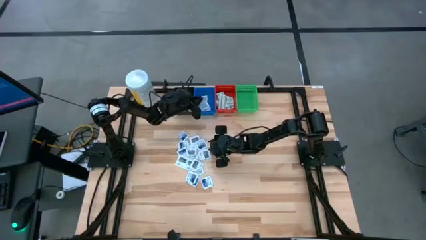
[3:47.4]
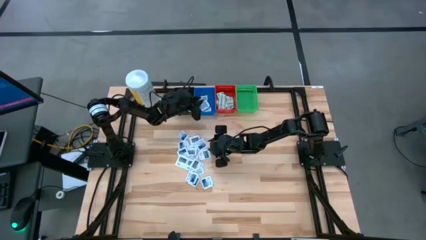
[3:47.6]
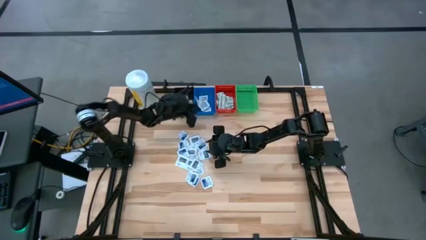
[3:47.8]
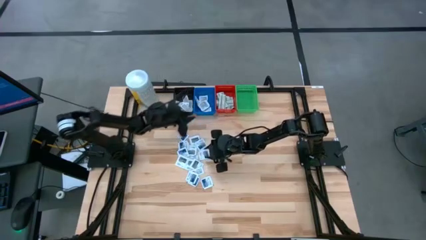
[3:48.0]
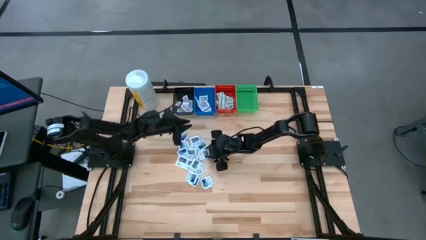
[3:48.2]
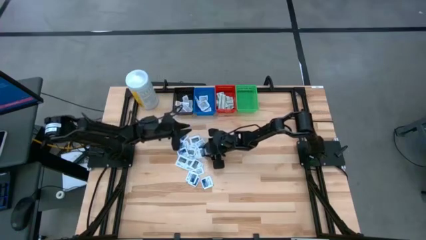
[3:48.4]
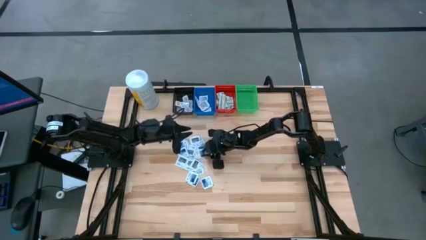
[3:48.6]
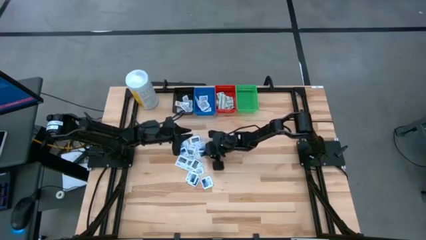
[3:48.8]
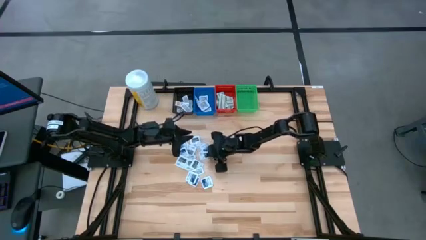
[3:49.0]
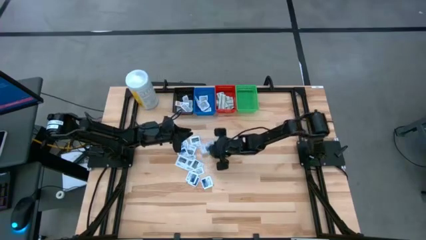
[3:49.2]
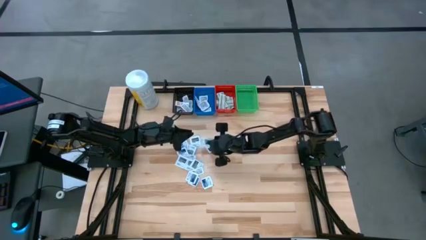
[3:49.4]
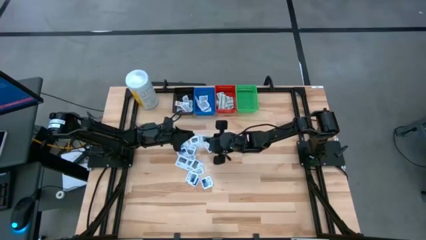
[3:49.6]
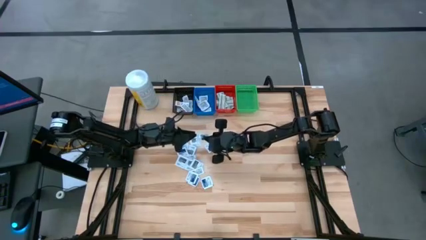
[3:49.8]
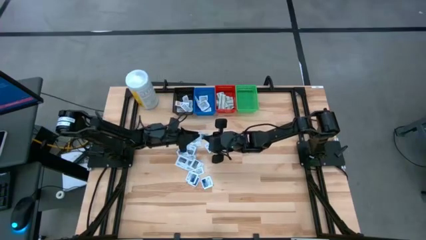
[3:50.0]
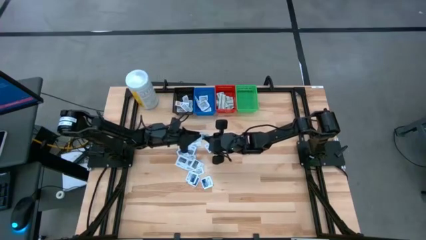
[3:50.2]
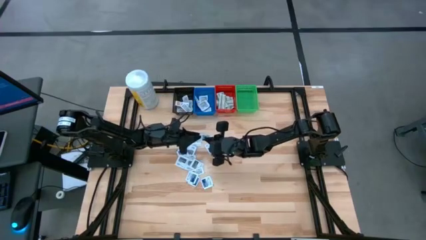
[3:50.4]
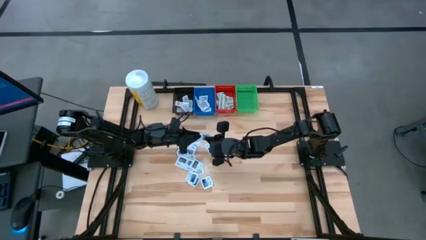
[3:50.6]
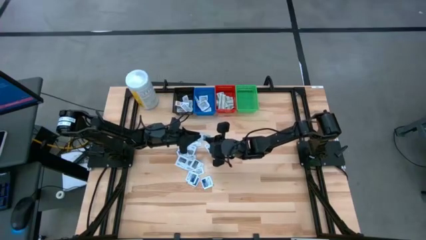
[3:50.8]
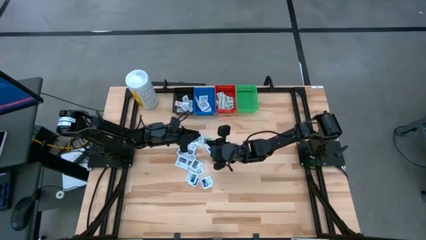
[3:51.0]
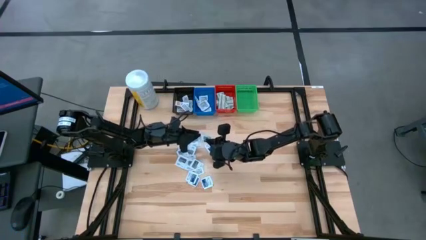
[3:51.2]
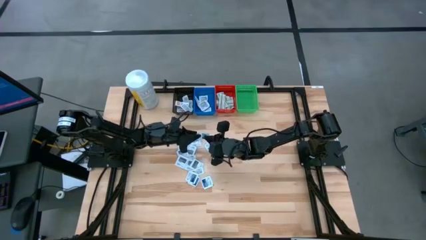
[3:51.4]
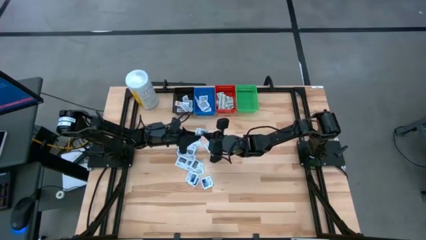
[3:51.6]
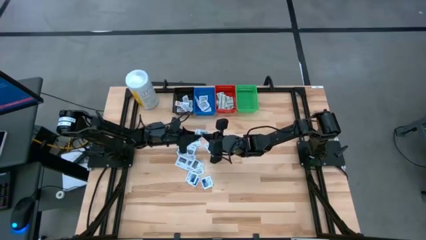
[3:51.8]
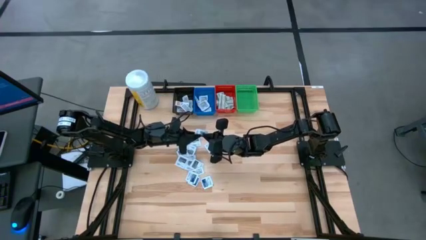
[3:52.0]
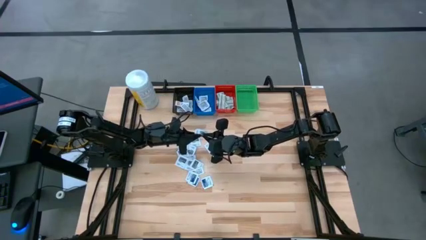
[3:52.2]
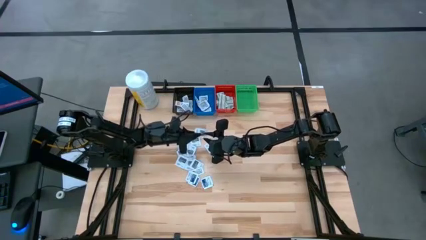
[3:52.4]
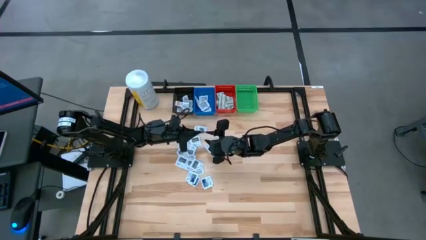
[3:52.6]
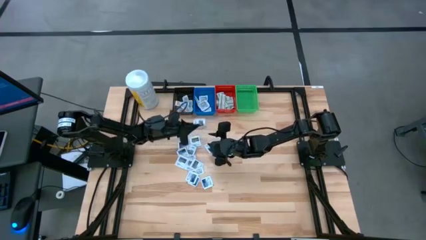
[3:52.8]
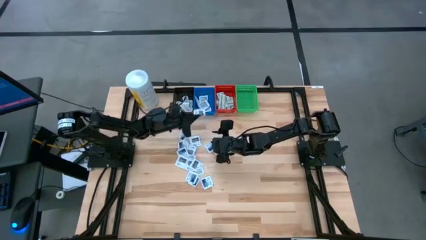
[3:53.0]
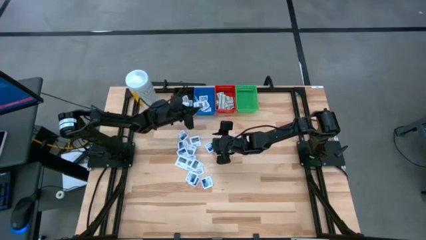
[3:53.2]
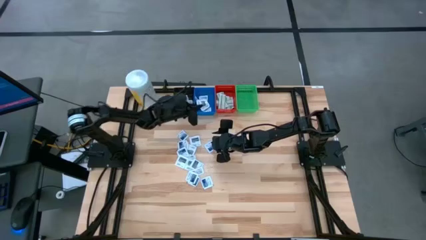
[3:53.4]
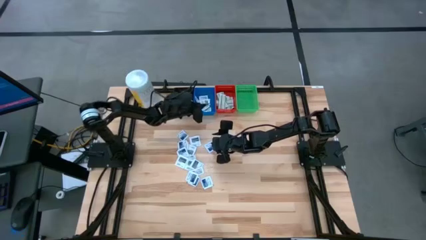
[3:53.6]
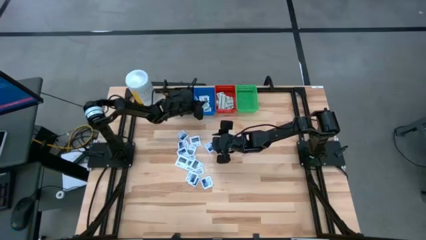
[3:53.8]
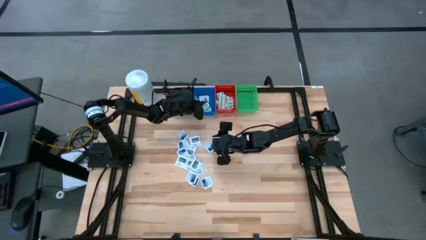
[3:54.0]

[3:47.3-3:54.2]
Task: Pick & Place First Aid Supplies
Put the gray towelette pack into the blue bin

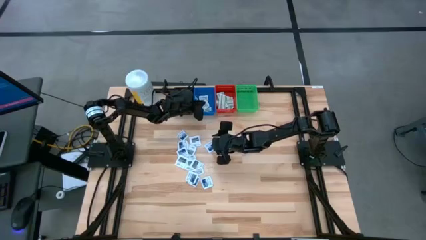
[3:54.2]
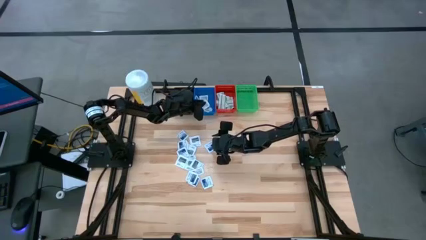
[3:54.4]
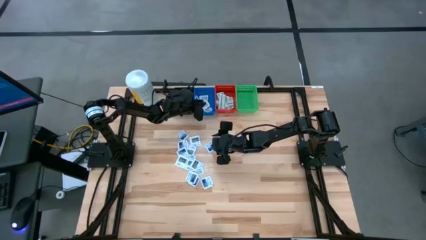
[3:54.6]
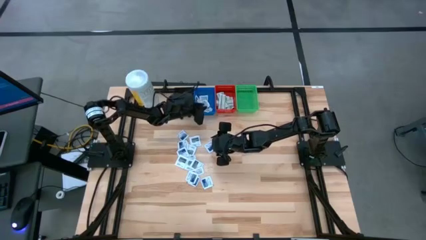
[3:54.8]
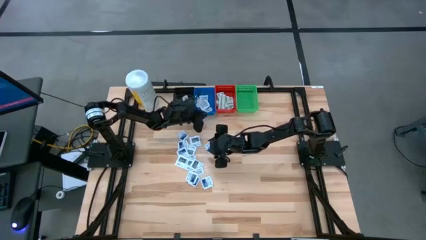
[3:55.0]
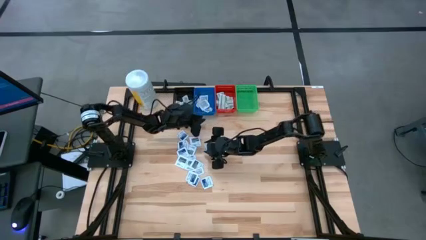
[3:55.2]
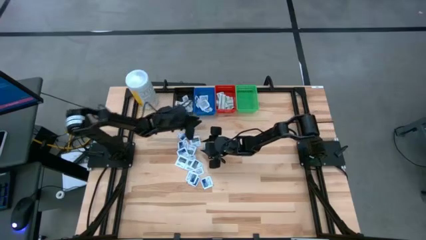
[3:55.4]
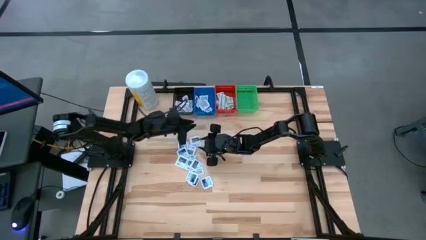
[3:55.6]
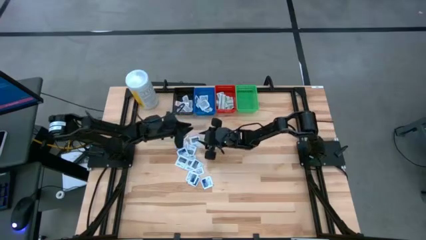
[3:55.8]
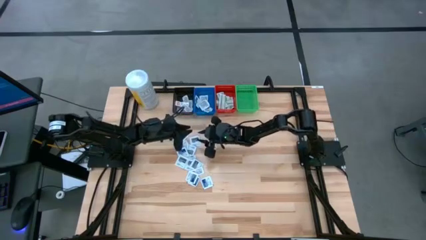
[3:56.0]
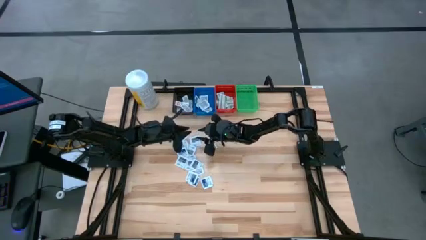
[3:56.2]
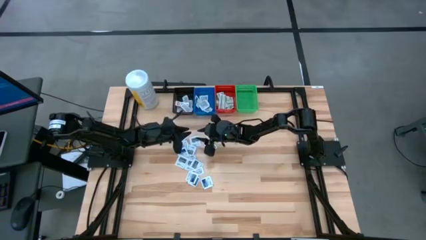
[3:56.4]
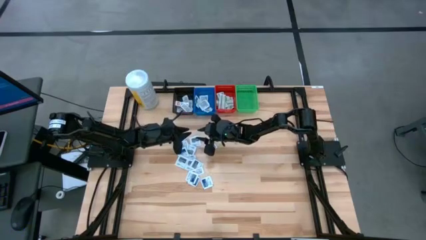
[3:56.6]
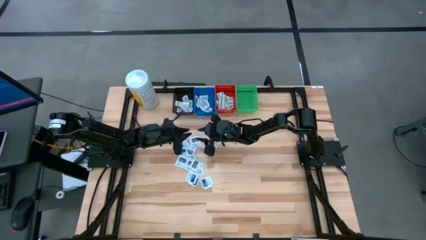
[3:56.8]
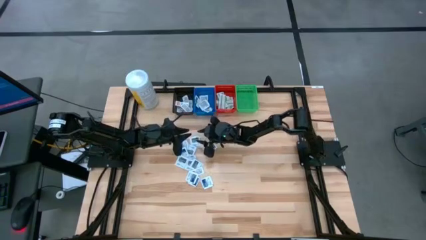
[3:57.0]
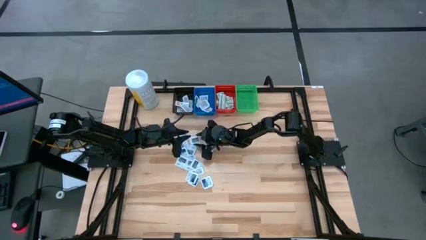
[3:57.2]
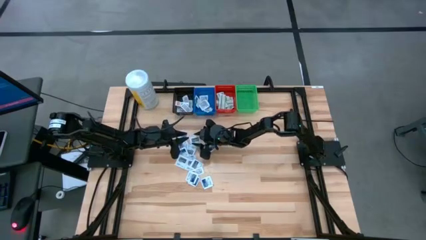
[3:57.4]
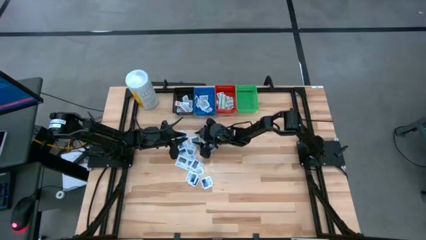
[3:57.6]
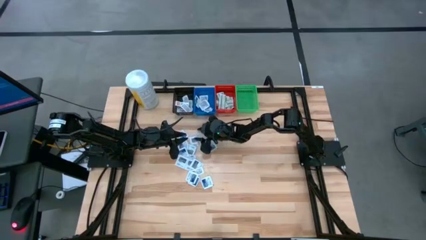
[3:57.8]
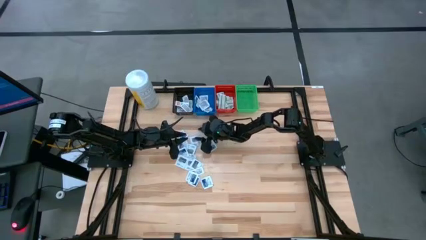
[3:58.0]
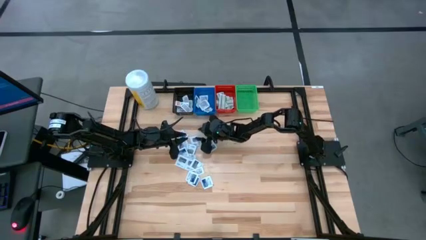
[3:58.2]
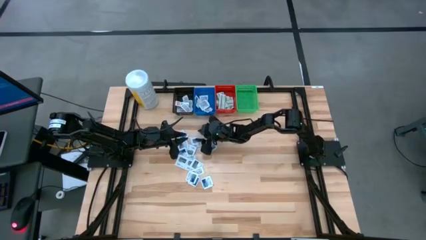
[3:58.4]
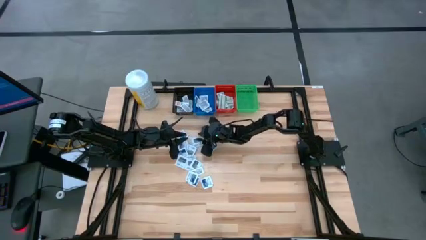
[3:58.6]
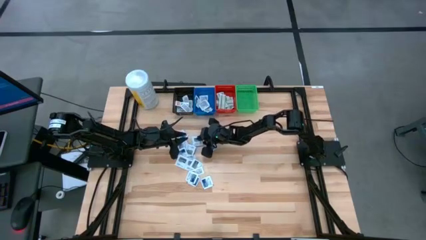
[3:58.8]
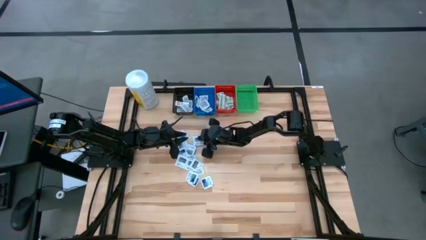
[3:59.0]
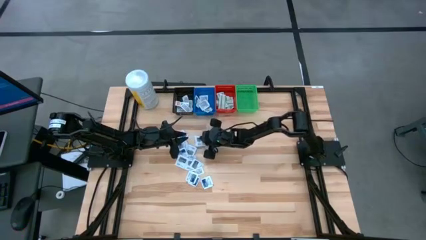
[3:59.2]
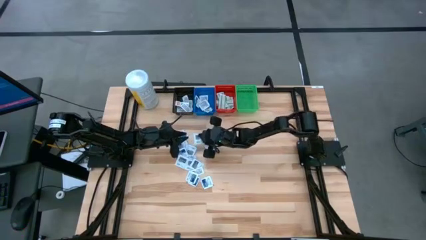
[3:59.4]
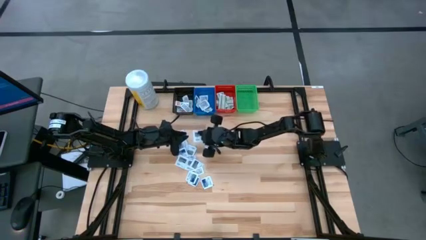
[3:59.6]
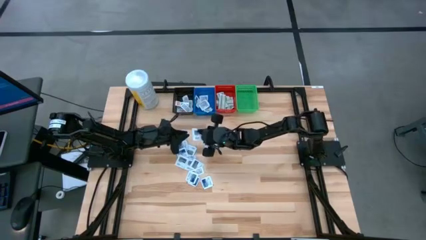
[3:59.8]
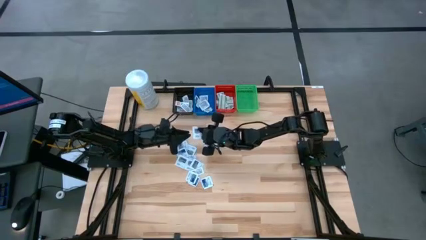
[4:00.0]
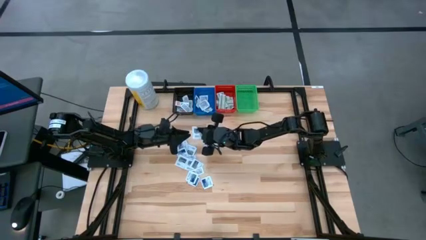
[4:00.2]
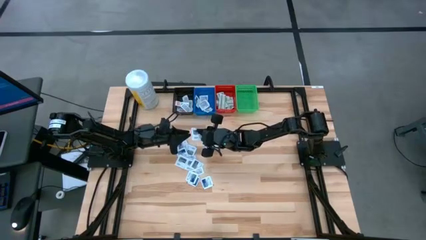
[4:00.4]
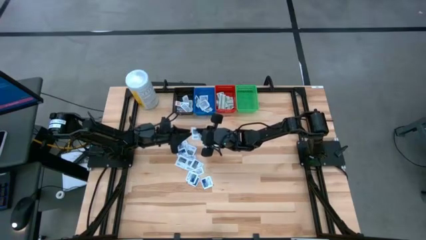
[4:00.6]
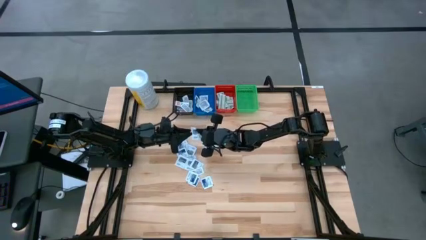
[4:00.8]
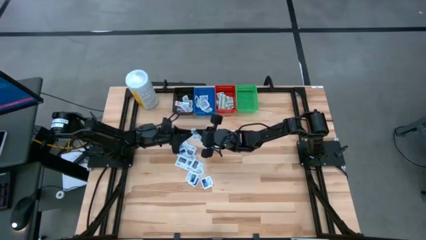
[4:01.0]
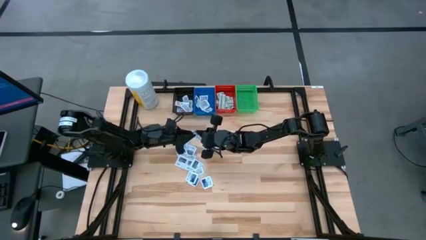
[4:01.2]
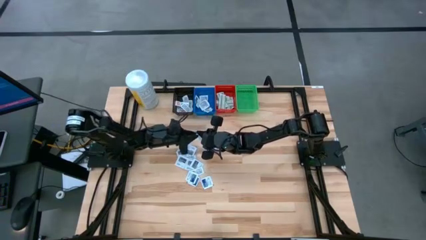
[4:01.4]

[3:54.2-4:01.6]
Put the gray towelette pack into the blue bin

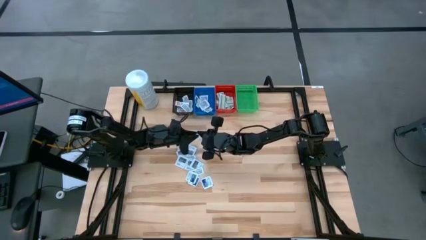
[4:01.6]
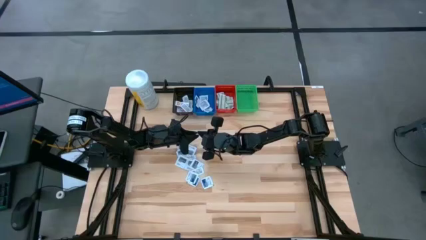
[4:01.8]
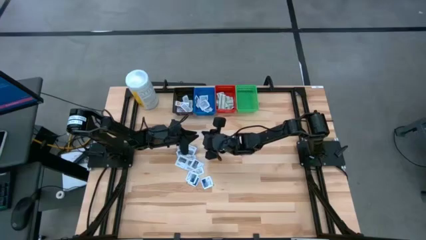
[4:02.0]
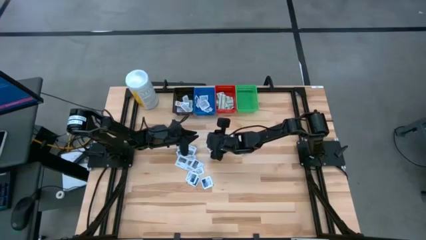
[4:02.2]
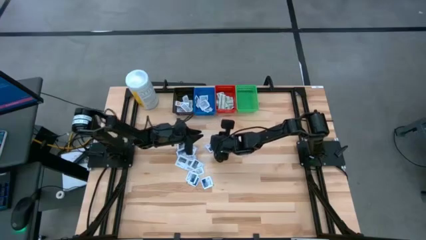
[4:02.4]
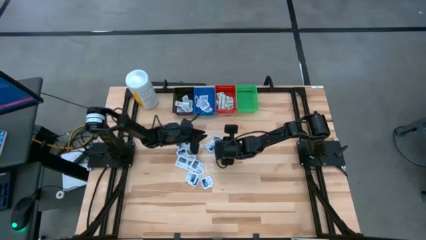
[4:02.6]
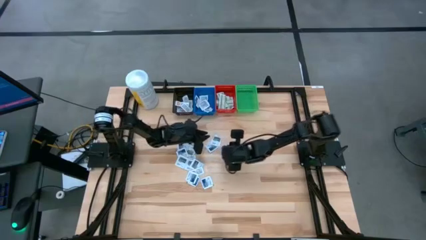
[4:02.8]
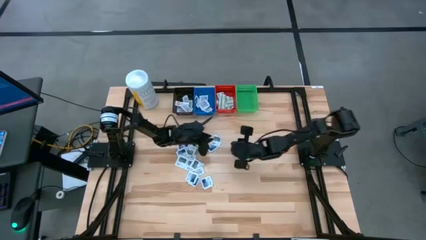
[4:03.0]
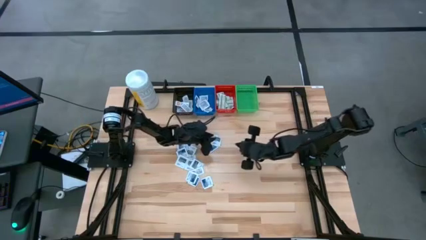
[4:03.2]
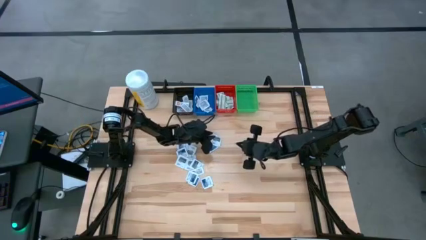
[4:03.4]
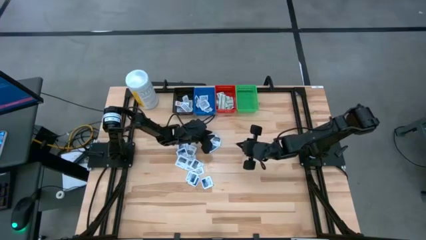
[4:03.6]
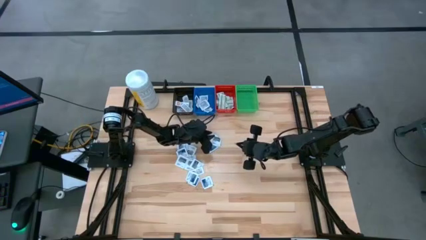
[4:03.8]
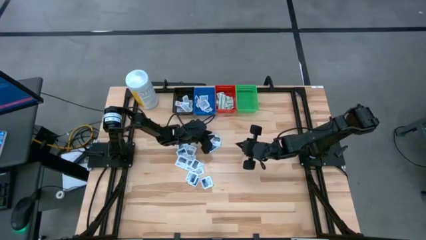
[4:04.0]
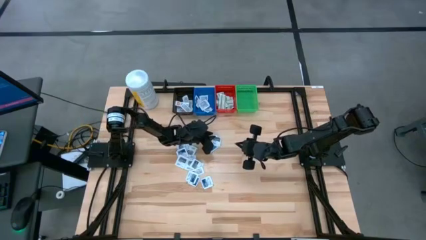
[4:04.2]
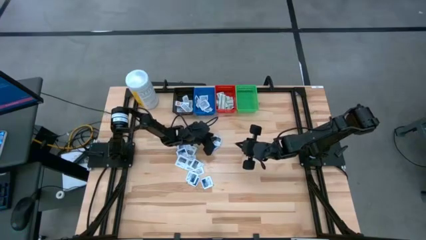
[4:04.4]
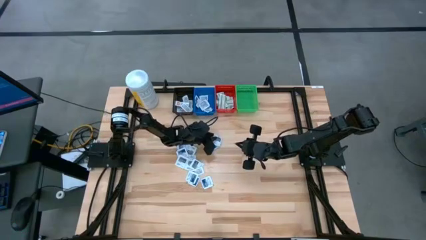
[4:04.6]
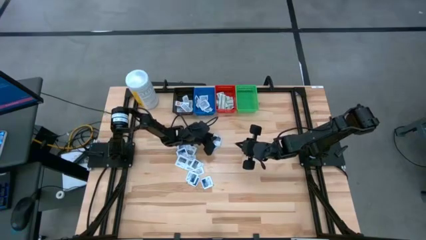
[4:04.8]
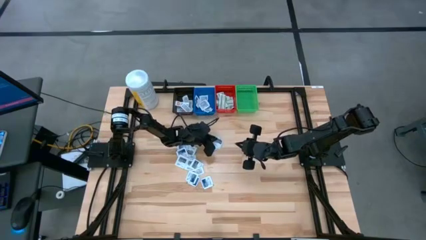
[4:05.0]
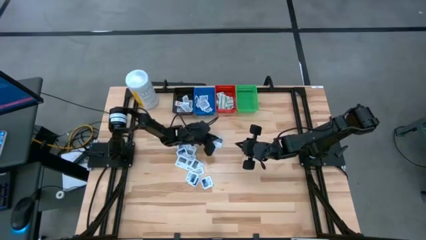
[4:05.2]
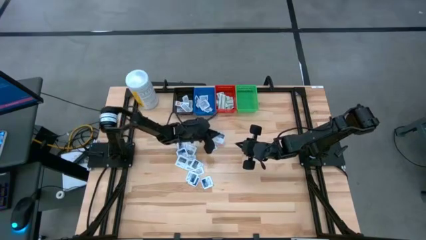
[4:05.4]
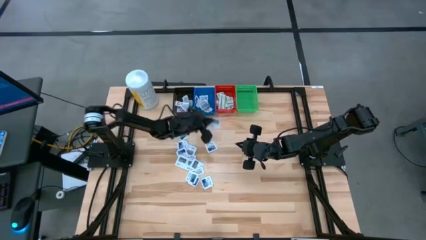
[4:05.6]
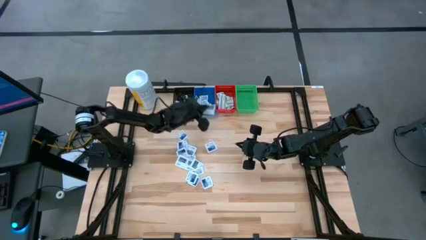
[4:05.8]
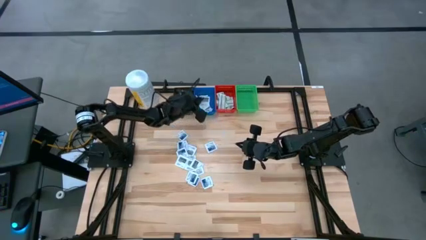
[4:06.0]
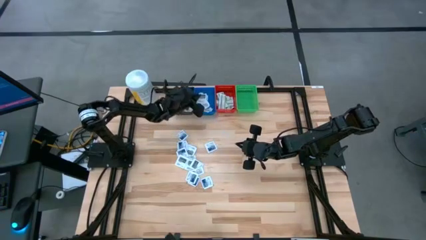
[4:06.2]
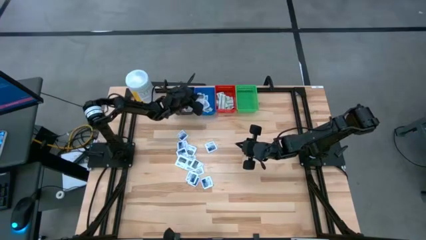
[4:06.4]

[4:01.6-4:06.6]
Put the gray towelette pack into the blue bin
